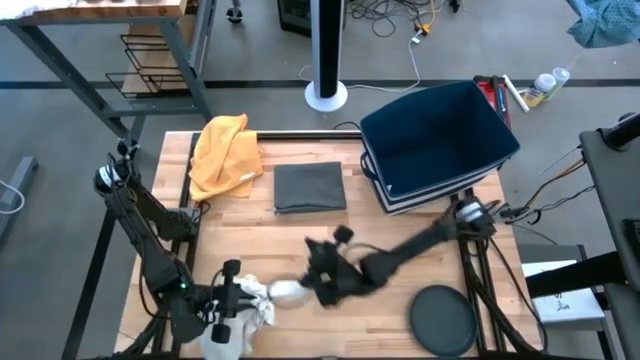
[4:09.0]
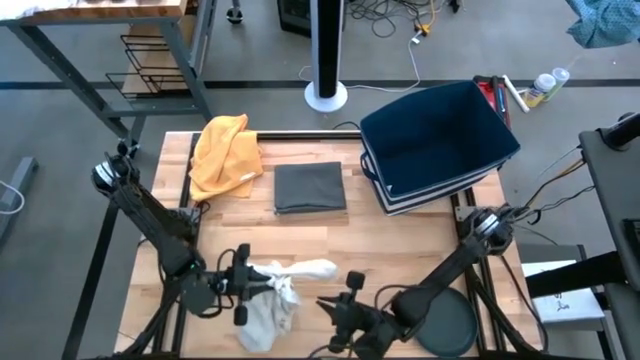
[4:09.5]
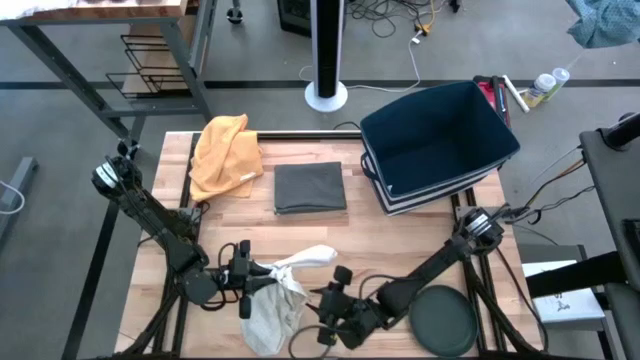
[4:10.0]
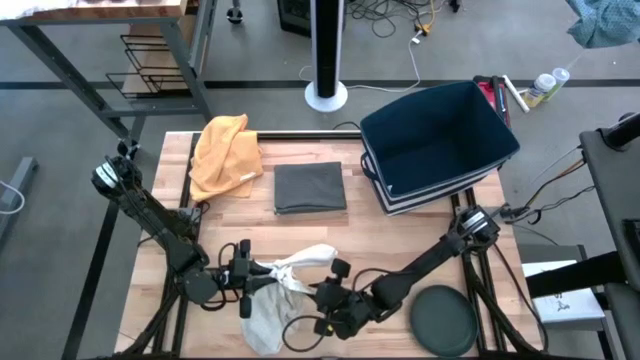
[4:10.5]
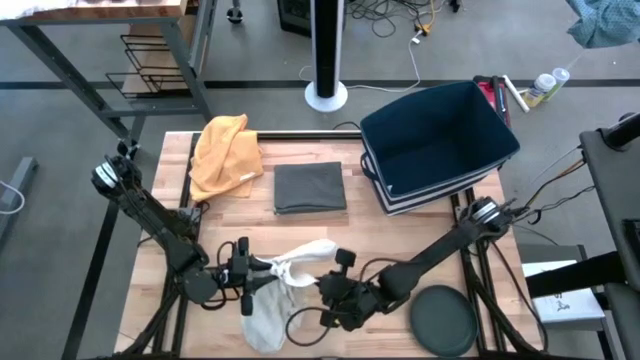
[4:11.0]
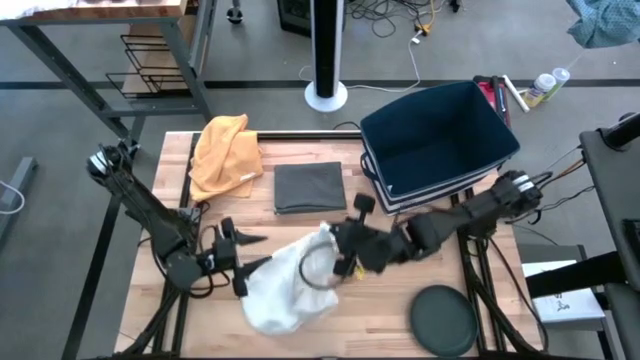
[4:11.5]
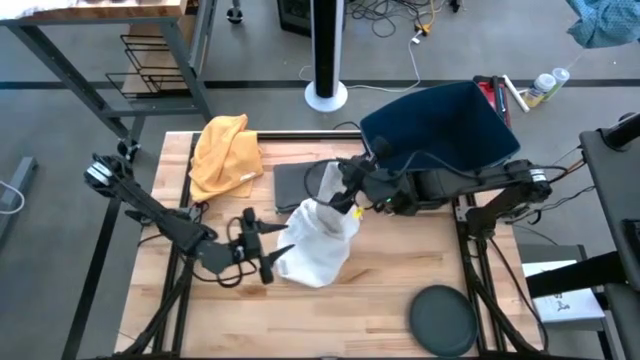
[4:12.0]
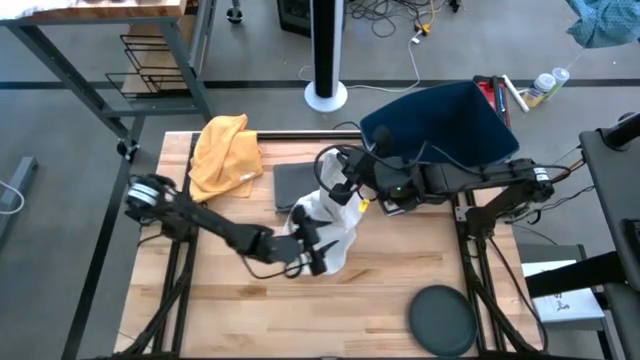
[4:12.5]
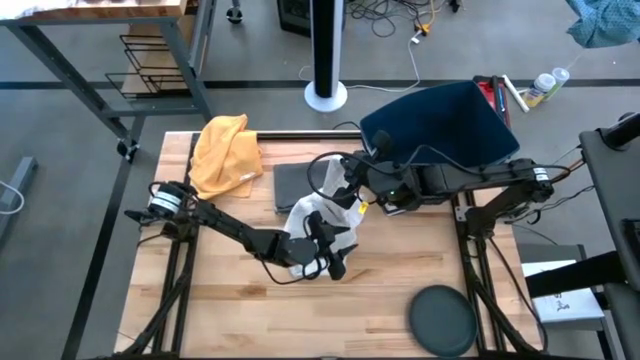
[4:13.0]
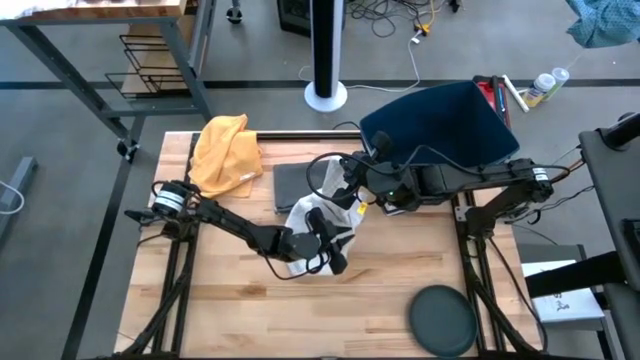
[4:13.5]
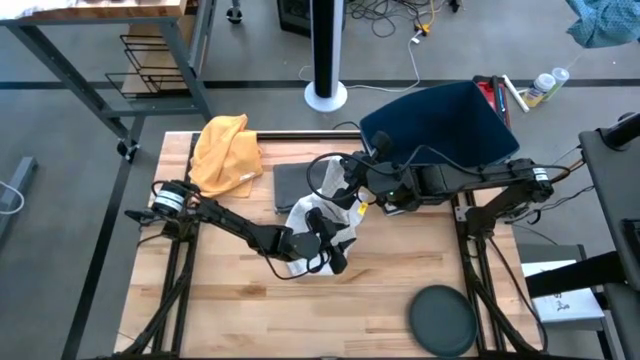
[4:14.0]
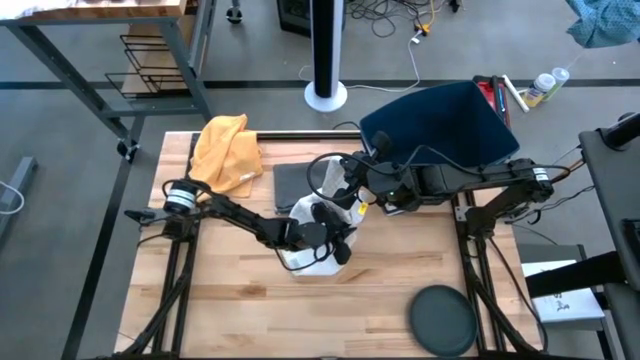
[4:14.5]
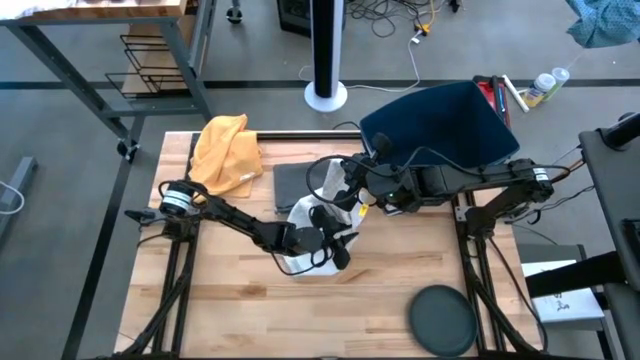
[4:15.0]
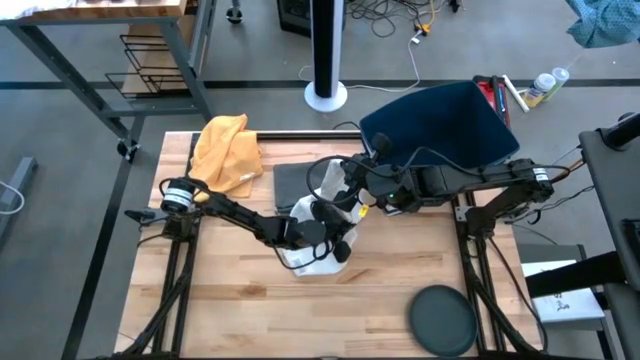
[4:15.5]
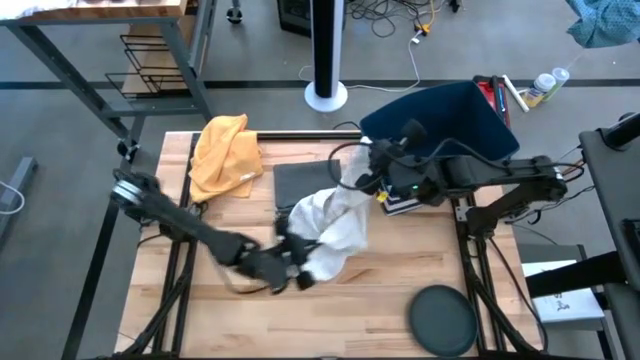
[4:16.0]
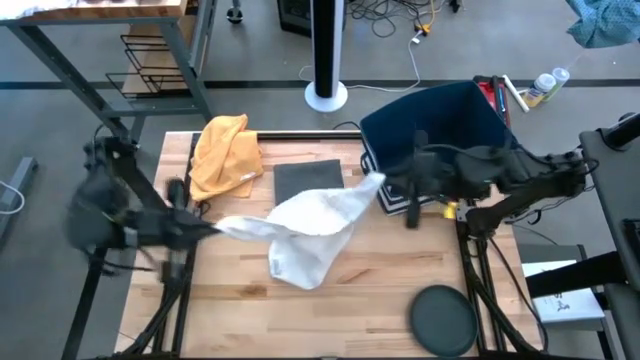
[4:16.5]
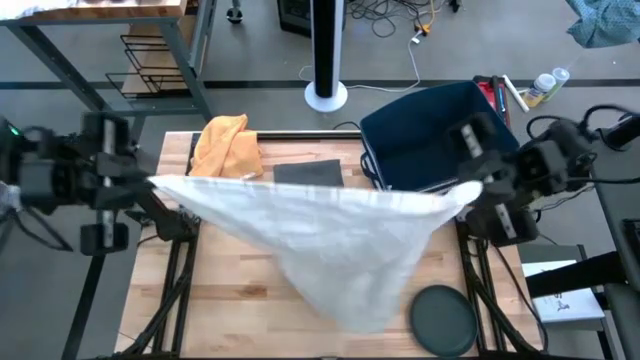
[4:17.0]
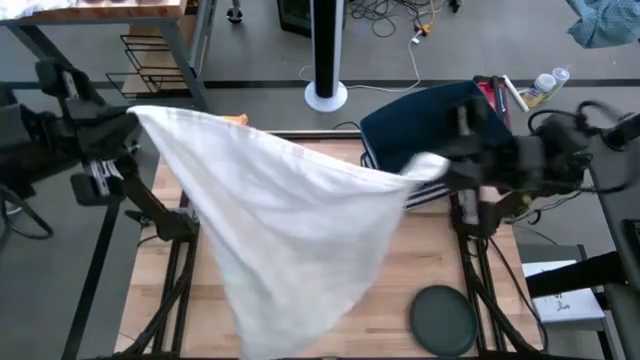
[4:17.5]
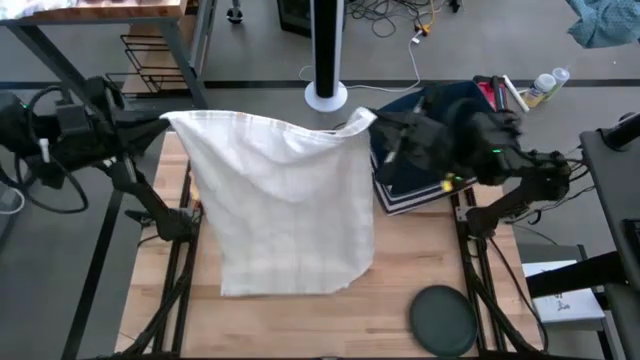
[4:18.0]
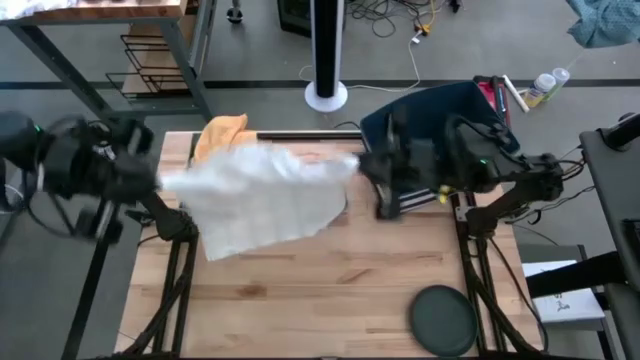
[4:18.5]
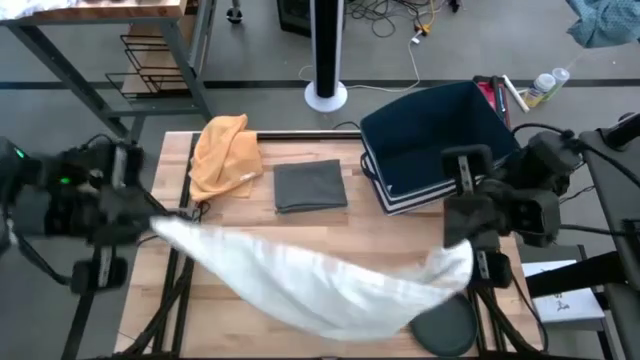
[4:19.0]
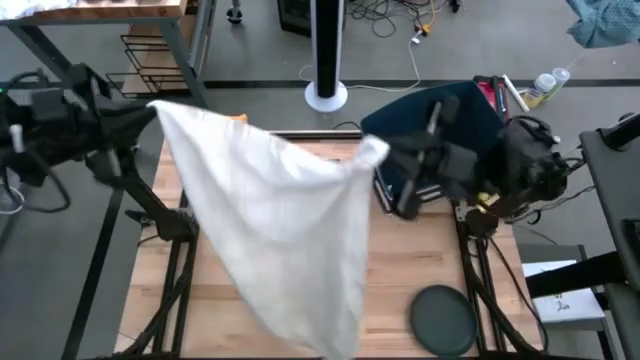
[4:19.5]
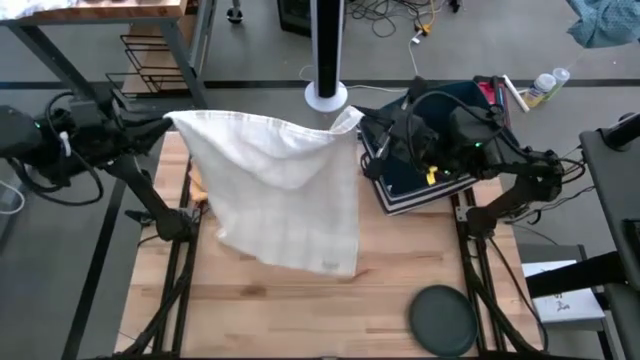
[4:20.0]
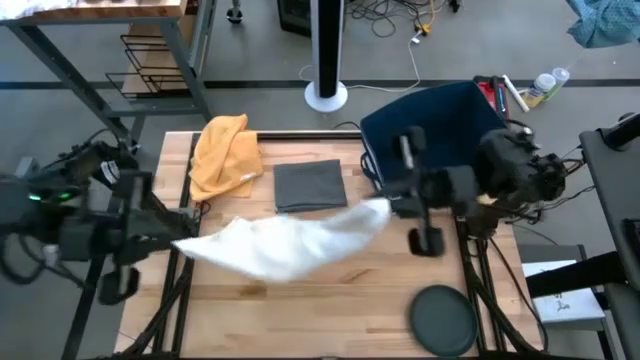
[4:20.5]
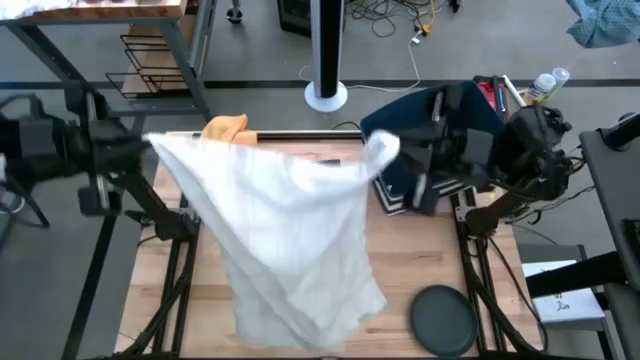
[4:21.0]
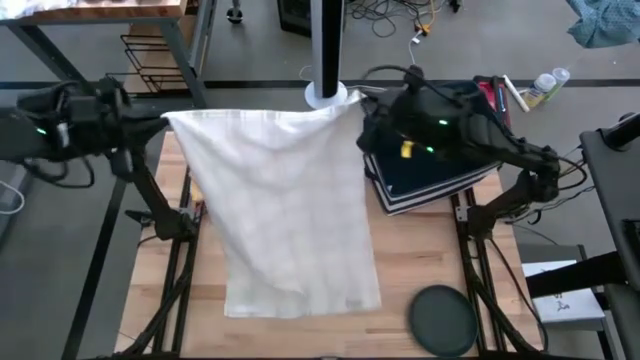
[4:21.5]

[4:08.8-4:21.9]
Task: Fold kitchen towel into neat rectangle
Fold the white patterned towel

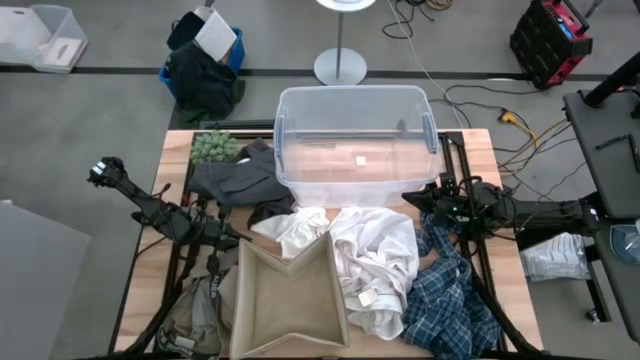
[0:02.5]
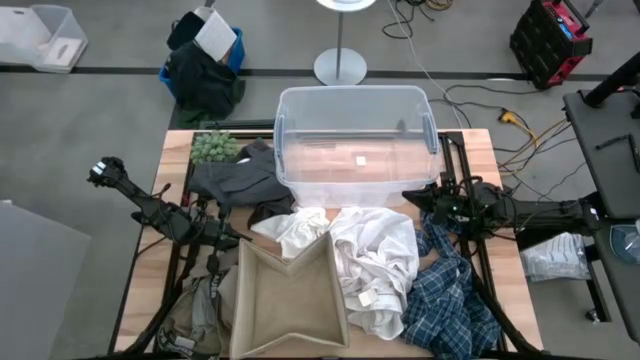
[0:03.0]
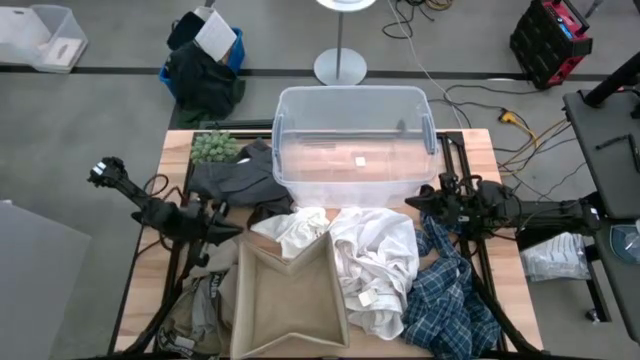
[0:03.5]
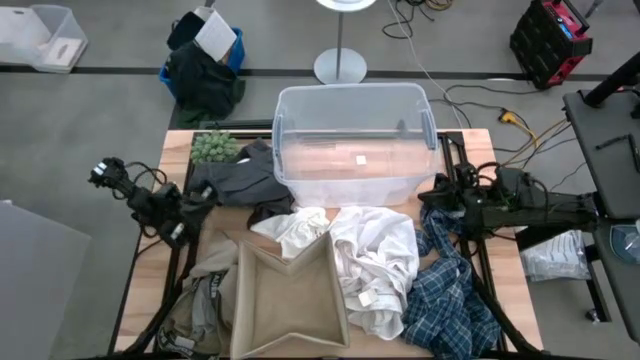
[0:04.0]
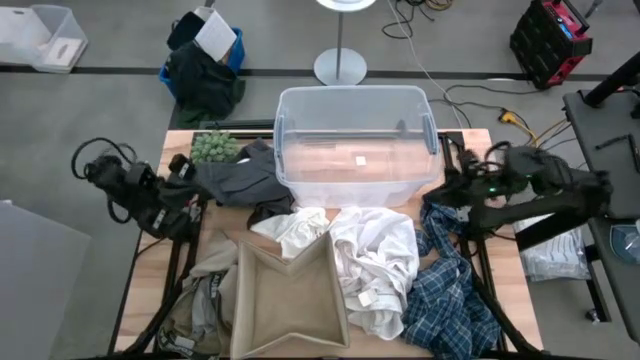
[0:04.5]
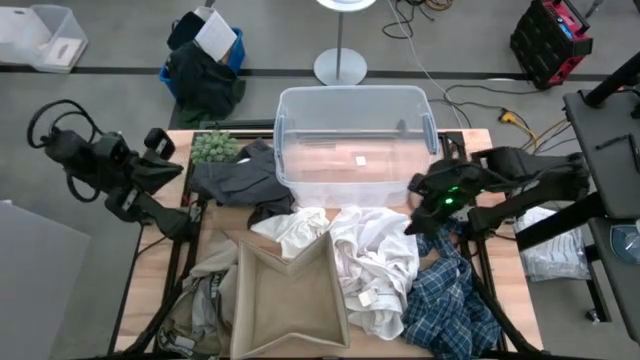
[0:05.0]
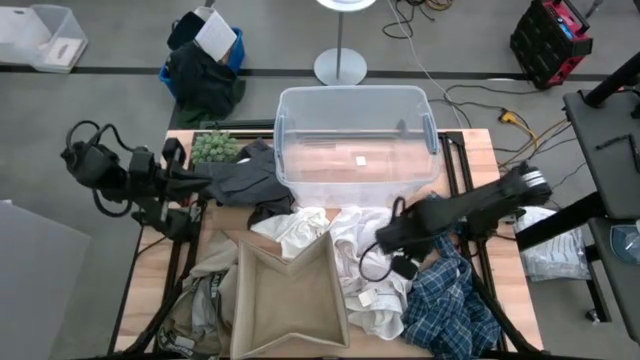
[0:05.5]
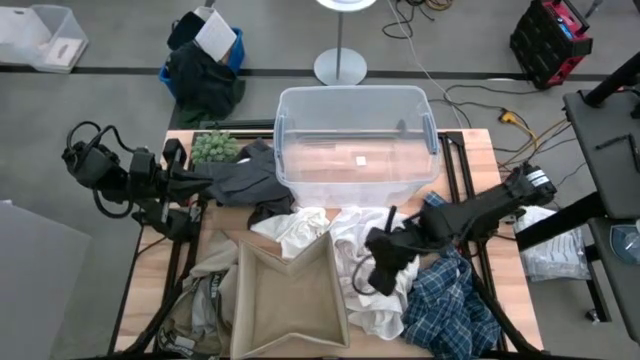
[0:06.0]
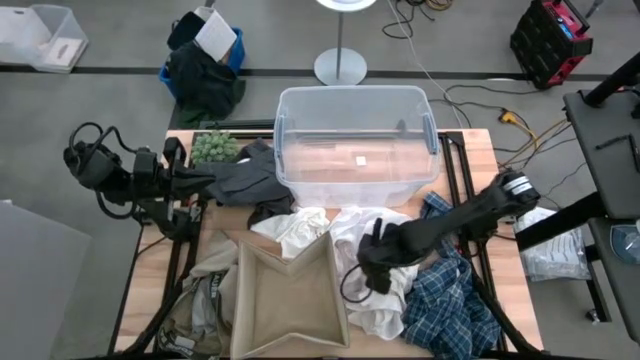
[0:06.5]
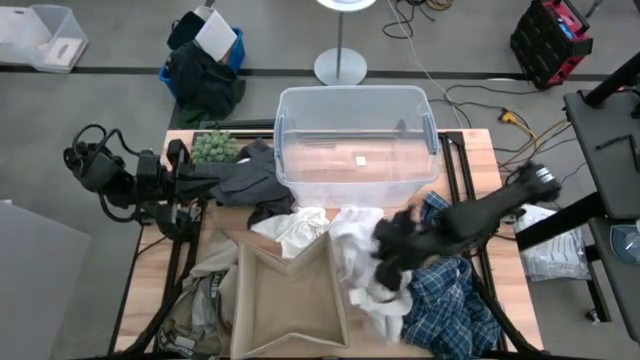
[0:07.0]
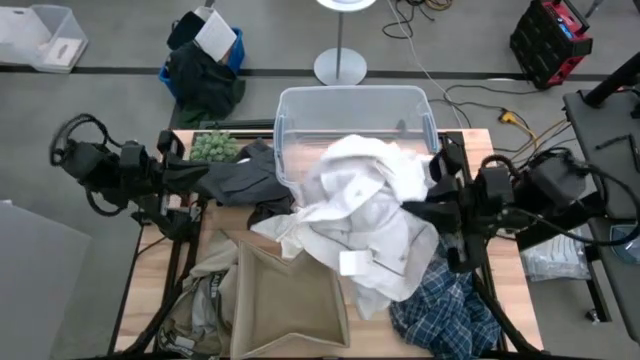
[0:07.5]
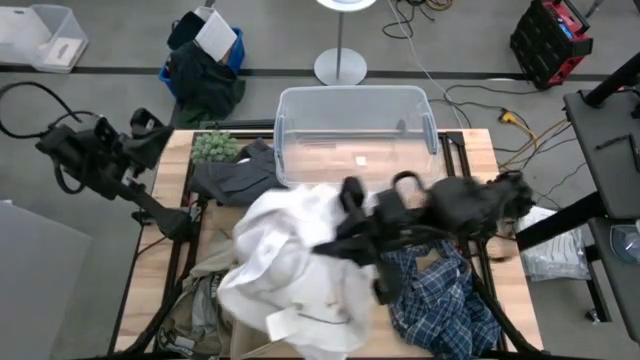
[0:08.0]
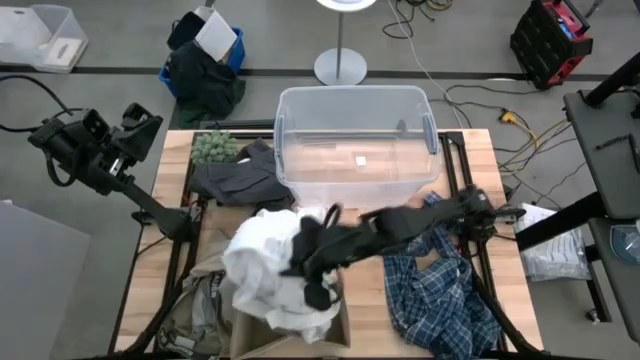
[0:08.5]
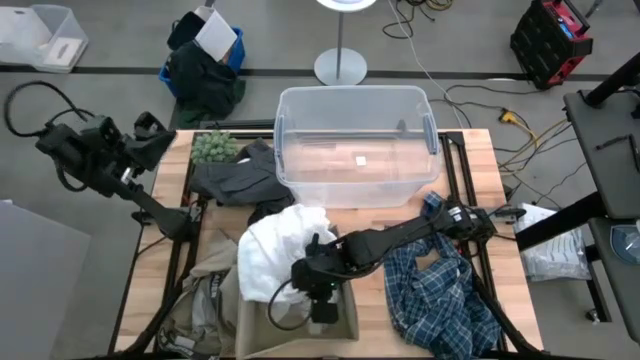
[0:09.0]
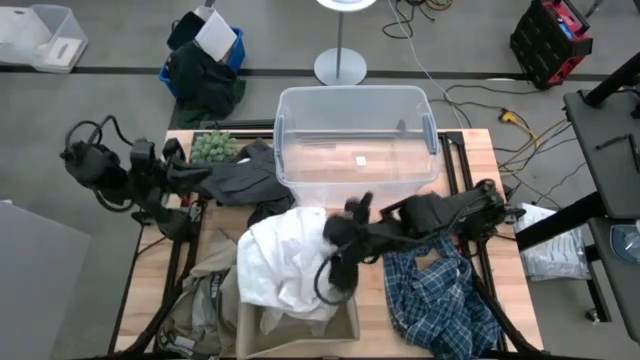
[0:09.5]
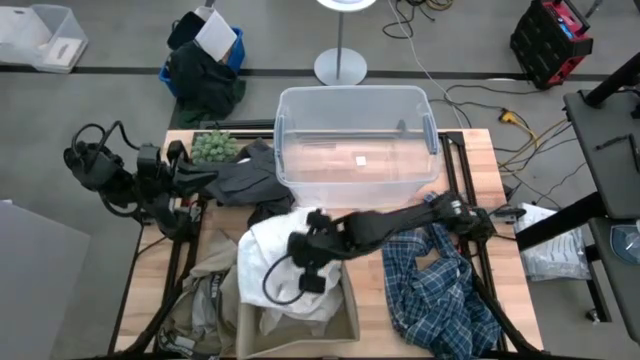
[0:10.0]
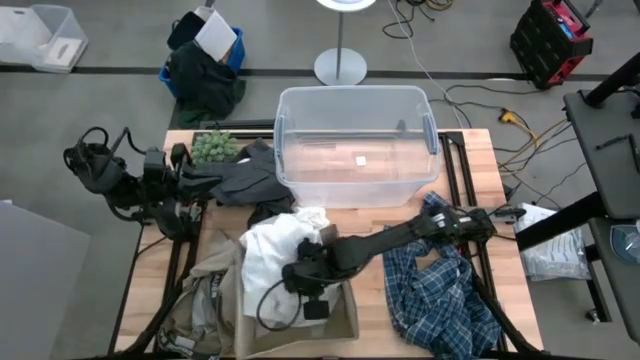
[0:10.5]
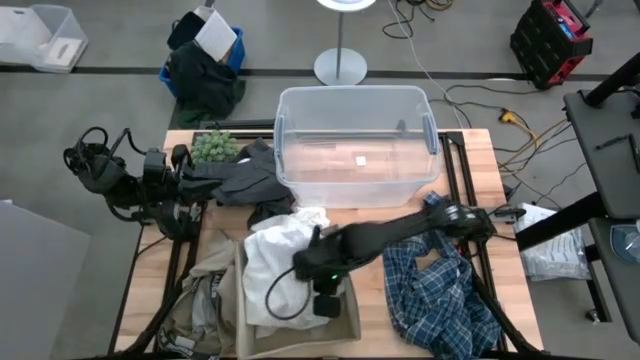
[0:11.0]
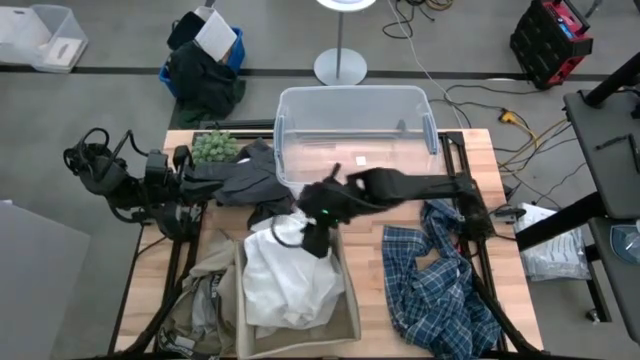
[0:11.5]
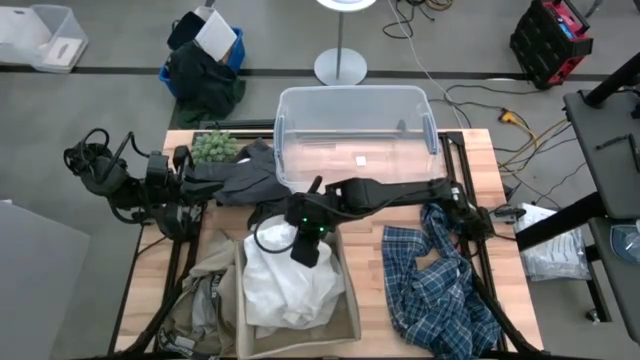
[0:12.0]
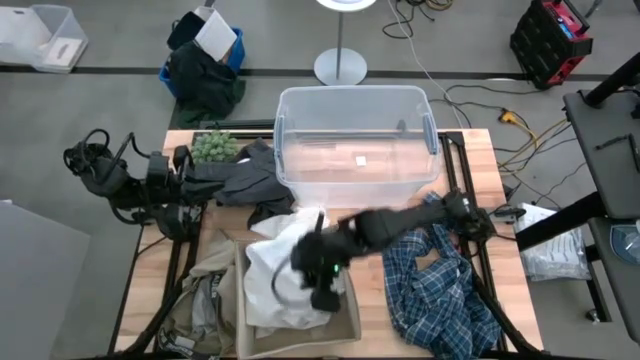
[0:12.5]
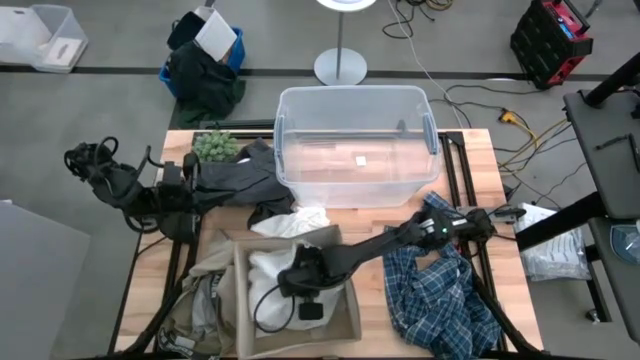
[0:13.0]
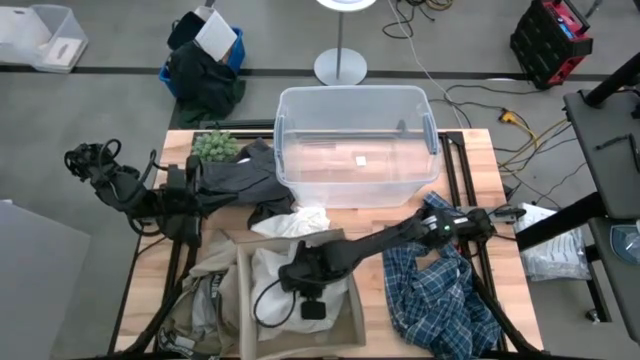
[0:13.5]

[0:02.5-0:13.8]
Task: Sort clothes
Put the white shirt into the laundry organizer
